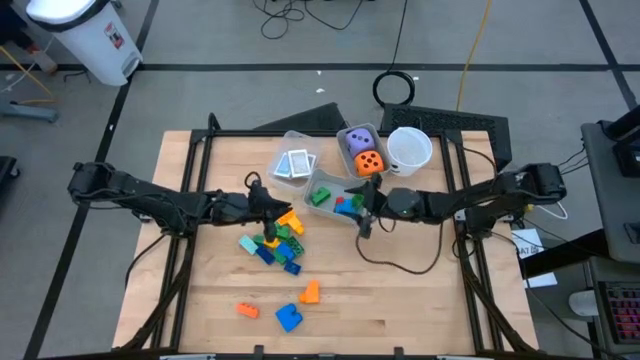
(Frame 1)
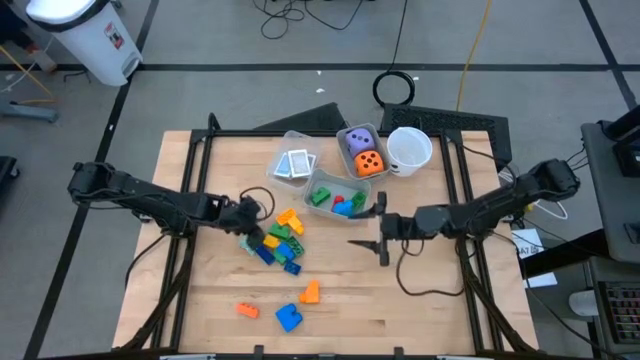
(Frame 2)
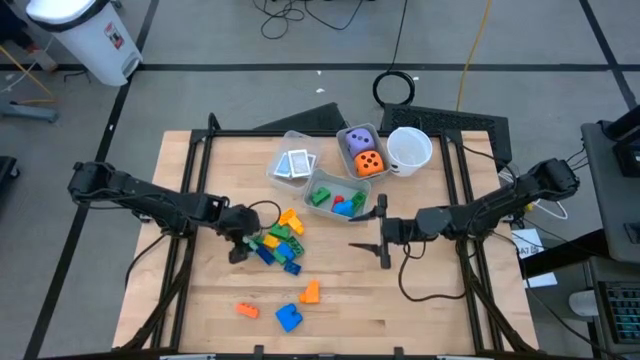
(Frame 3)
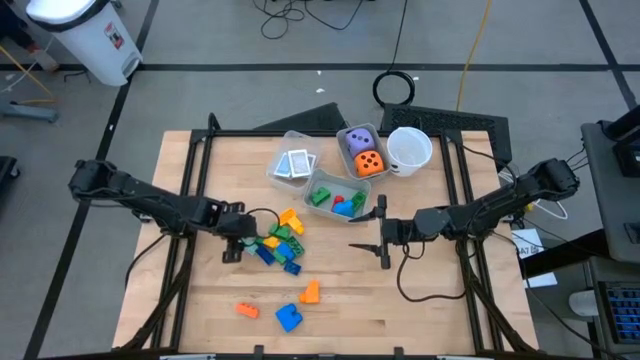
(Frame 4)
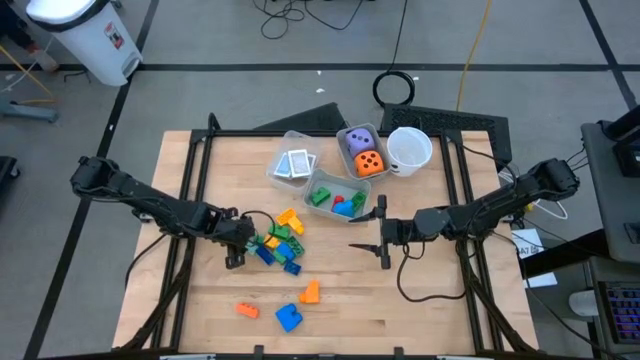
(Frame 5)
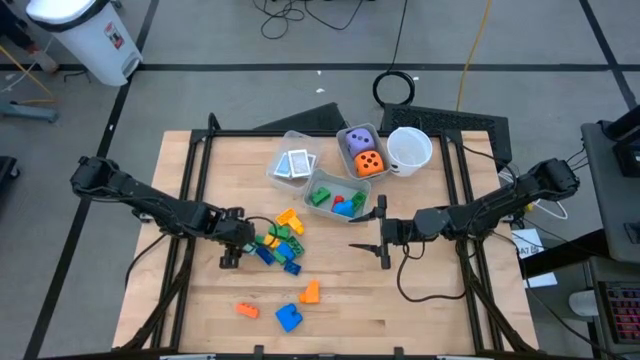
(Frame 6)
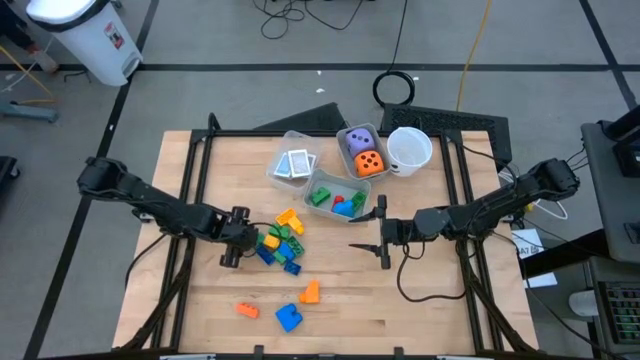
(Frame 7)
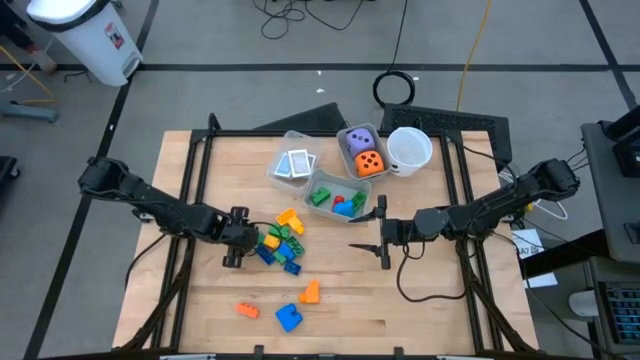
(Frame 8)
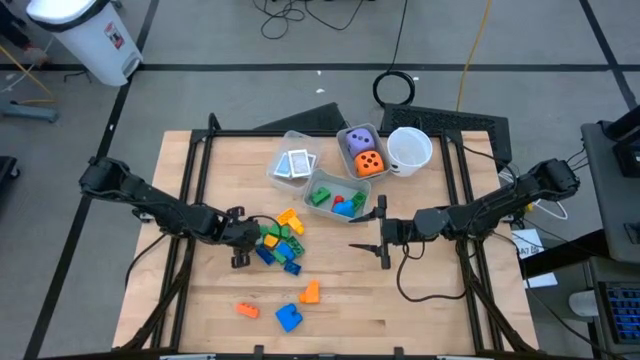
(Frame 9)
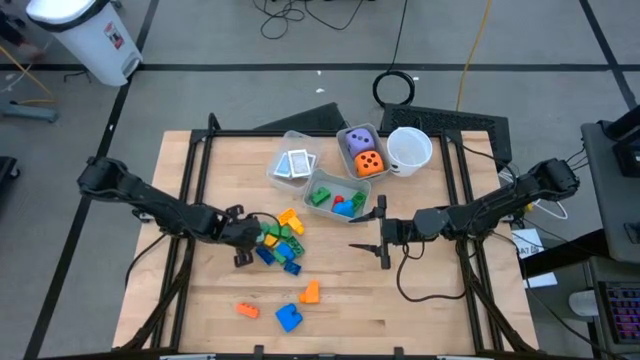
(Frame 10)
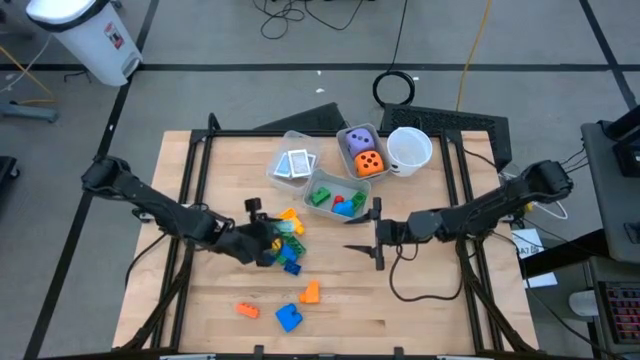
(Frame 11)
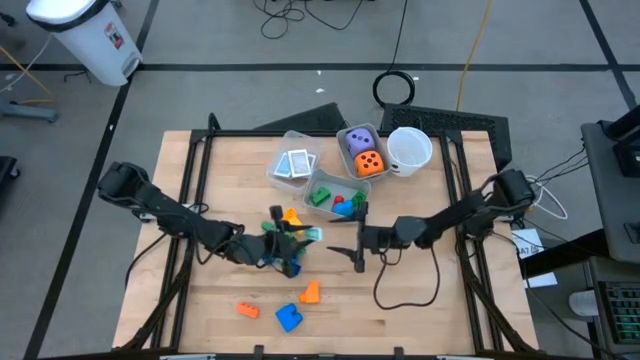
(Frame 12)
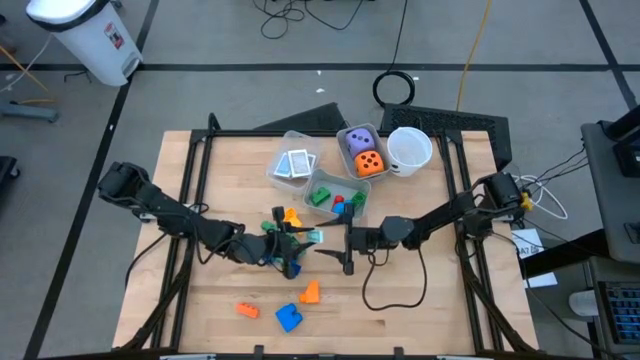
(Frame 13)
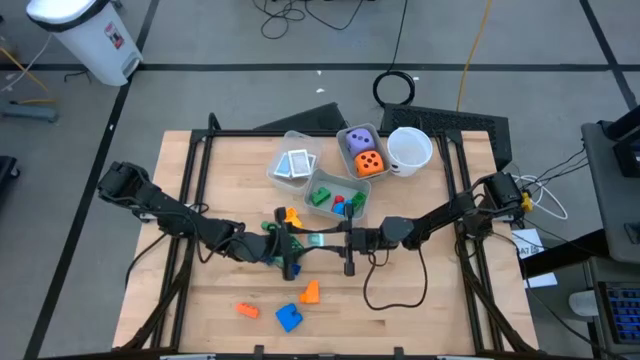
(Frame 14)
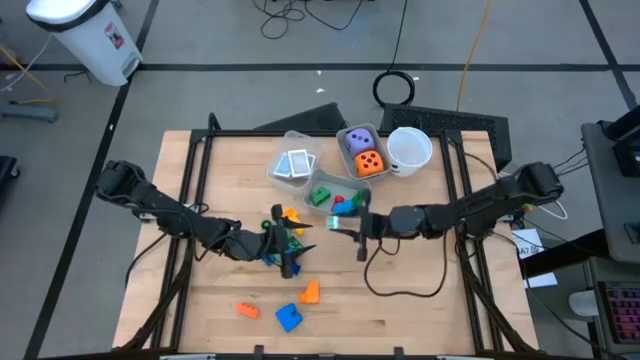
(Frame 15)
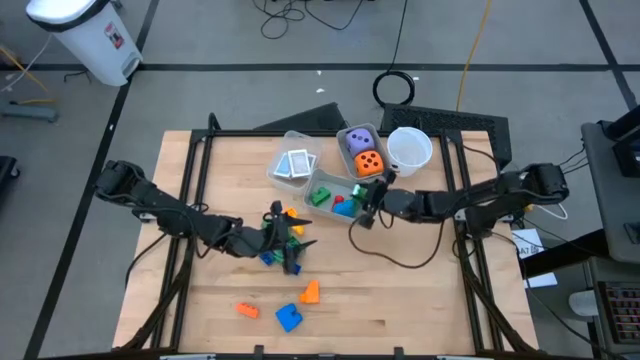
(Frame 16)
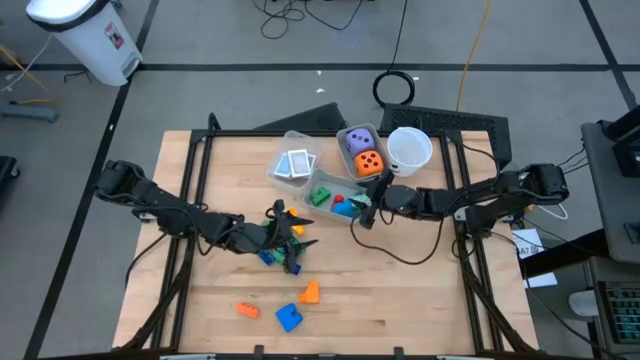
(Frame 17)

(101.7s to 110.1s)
Task: Pick & Place Toys
Put the light blue game piece into the bottom gray bin

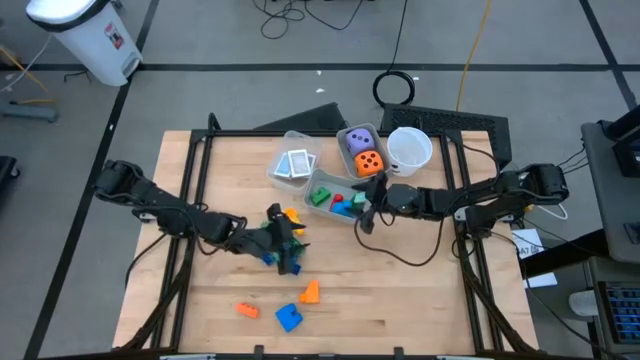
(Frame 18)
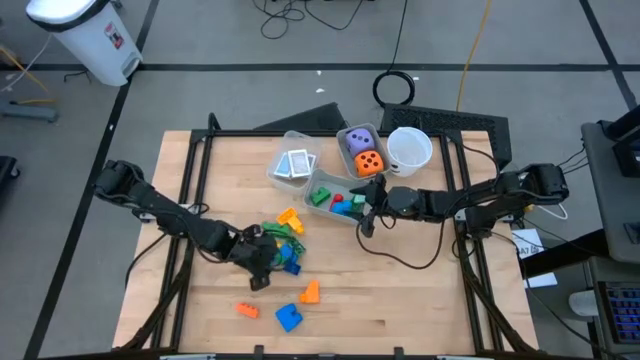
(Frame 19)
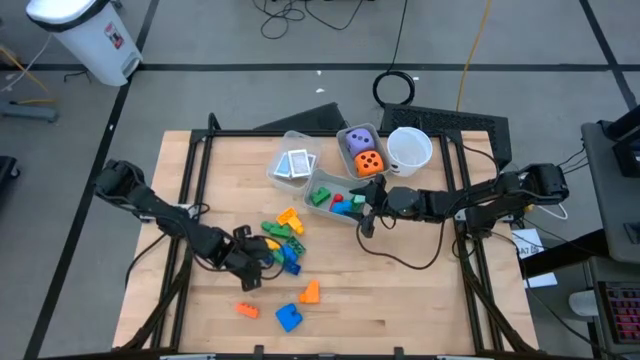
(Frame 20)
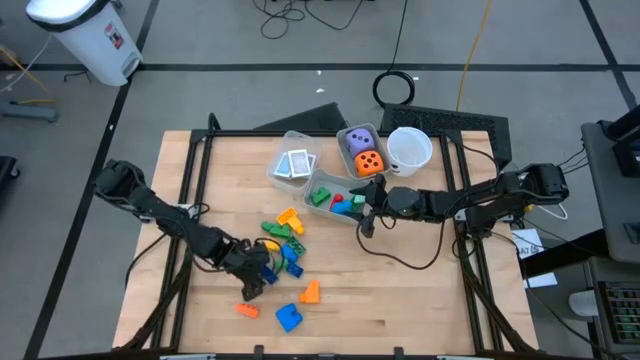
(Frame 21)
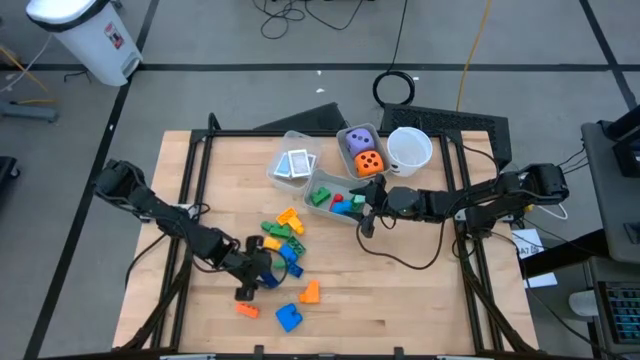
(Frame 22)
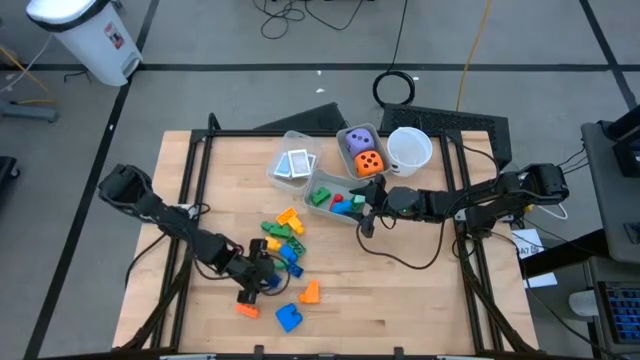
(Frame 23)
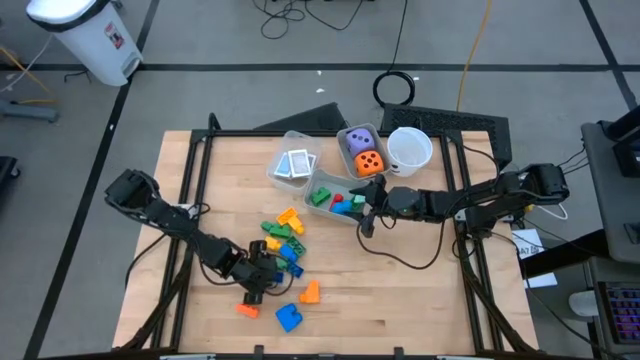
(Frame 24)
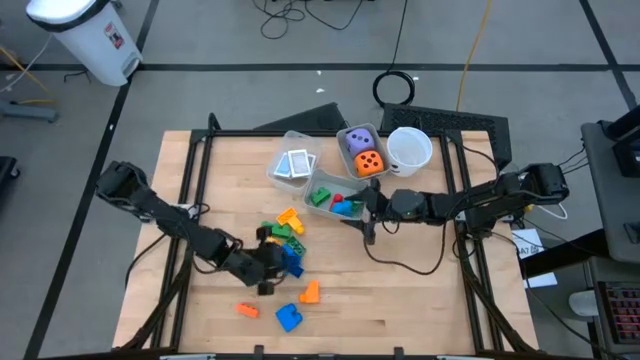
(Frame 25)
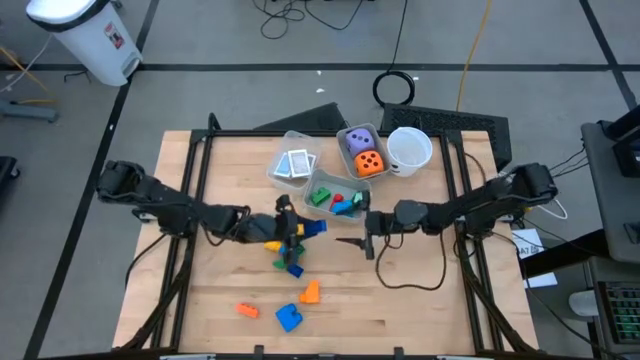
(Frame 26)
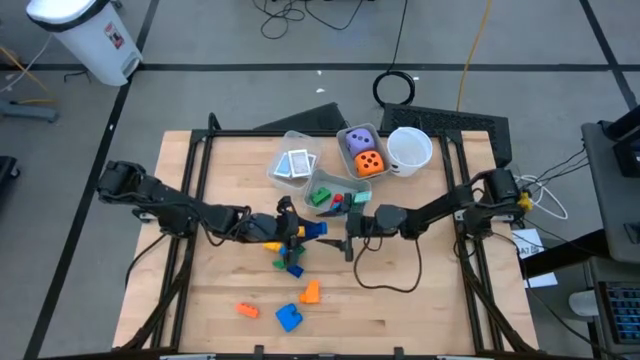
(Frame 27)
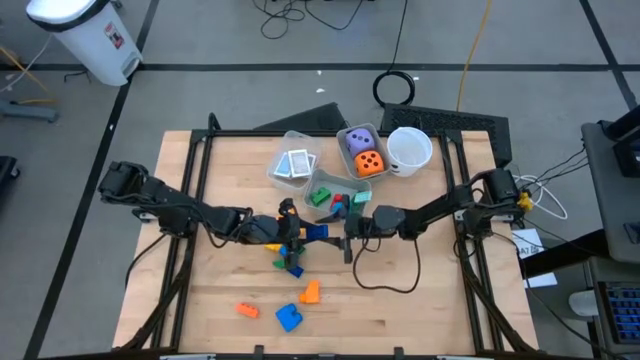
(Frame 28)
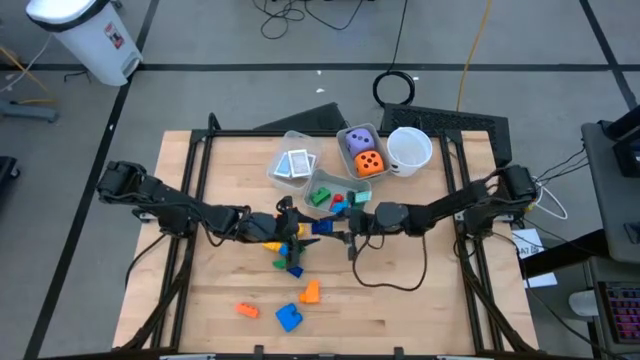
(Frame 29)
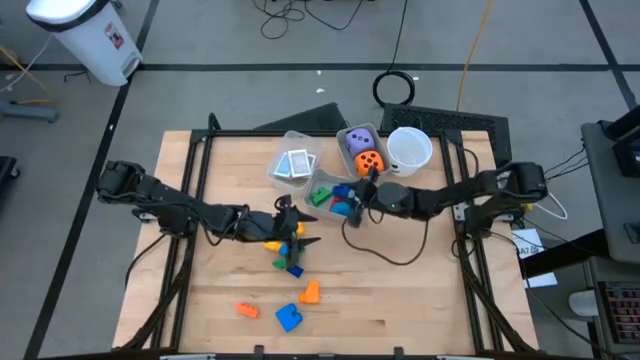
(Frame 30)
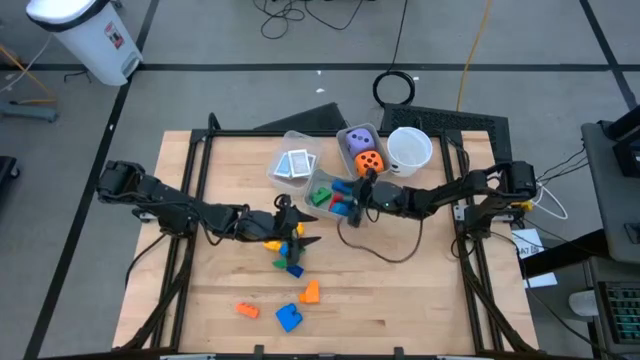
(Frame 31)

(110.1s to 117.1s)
Put the dark blue game piece into the bottom gray bin

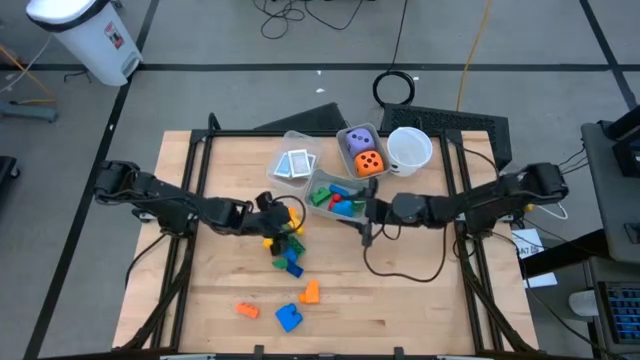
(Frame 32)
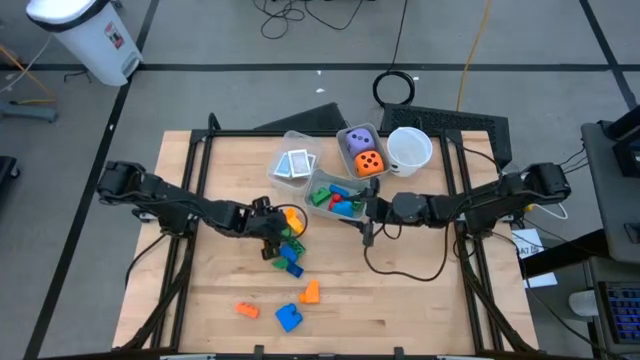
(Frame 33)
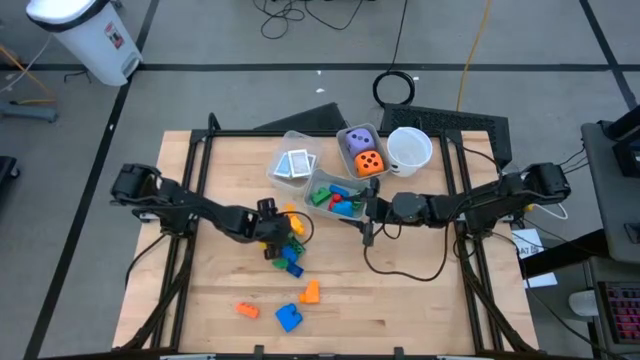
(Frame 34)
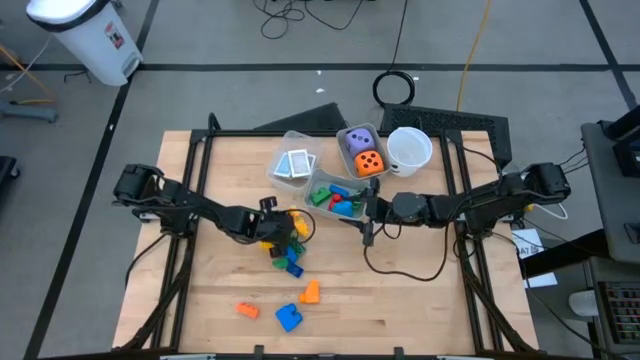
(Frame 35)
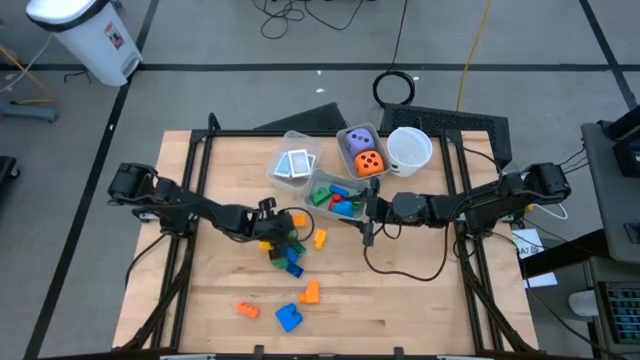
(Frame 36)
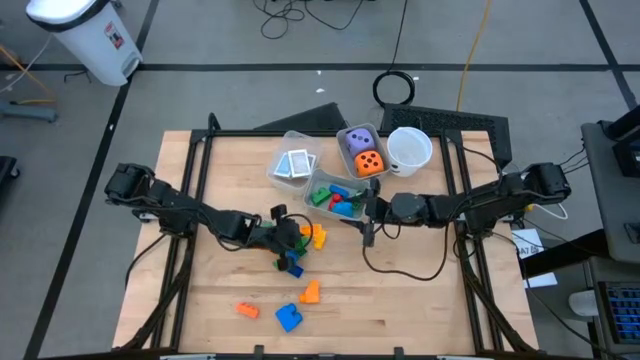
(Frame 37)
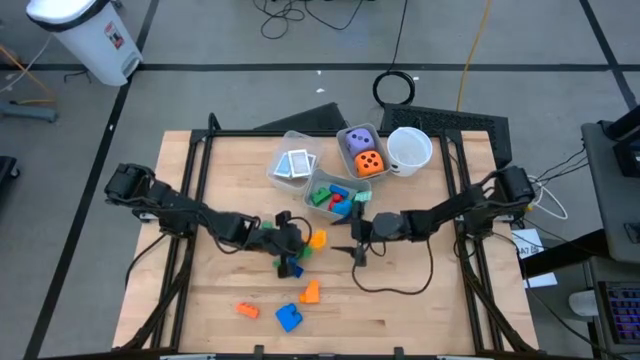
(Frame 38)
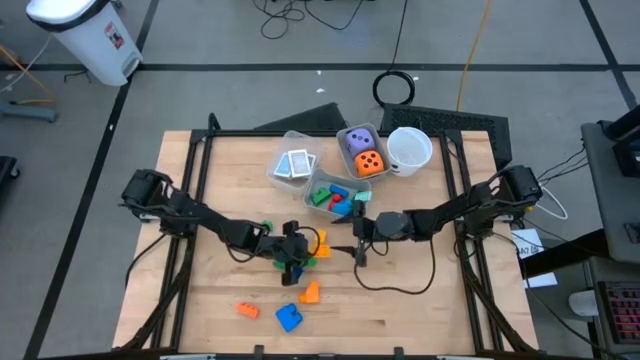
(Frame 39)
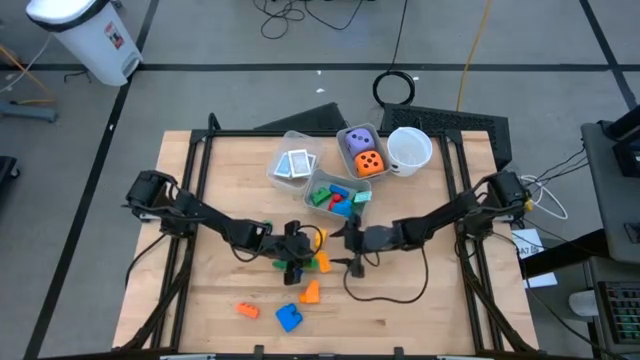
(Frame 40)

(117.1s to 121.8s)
Put the green game piece into the bottom gray bin

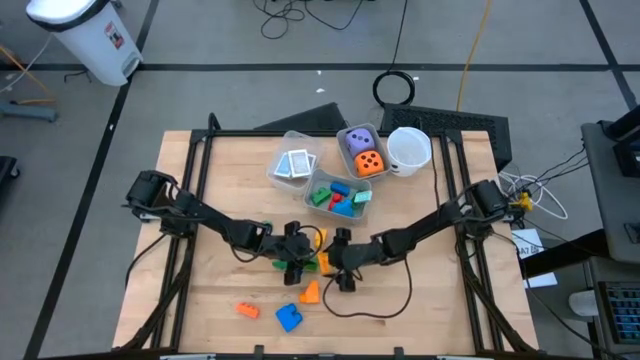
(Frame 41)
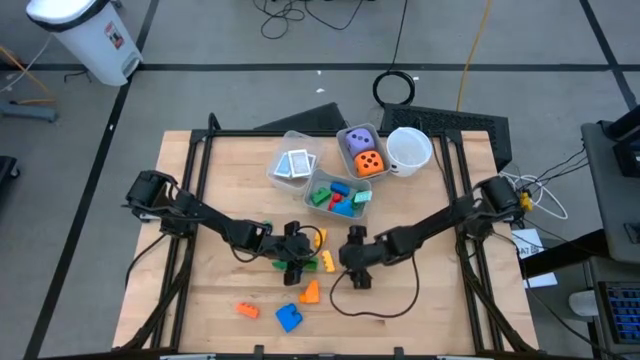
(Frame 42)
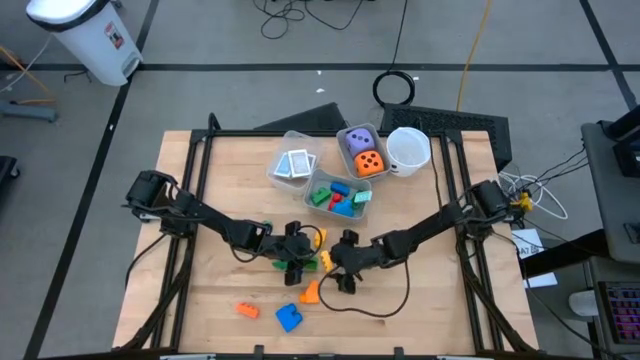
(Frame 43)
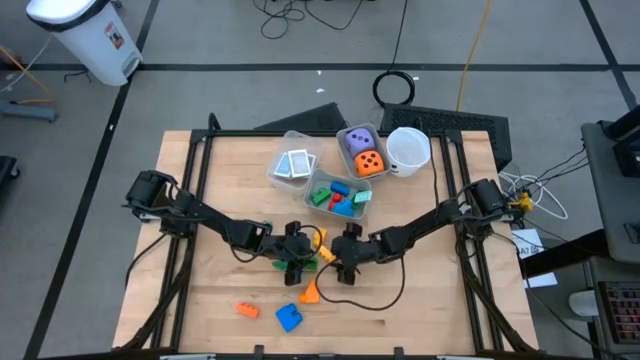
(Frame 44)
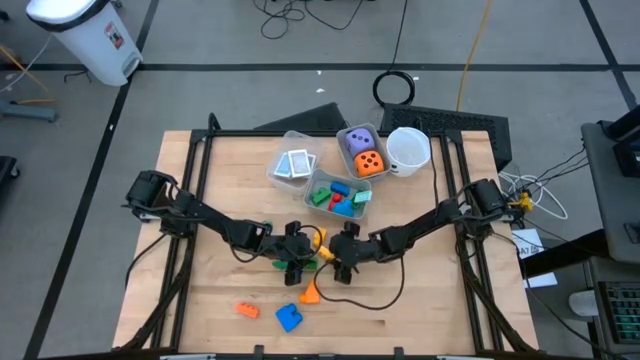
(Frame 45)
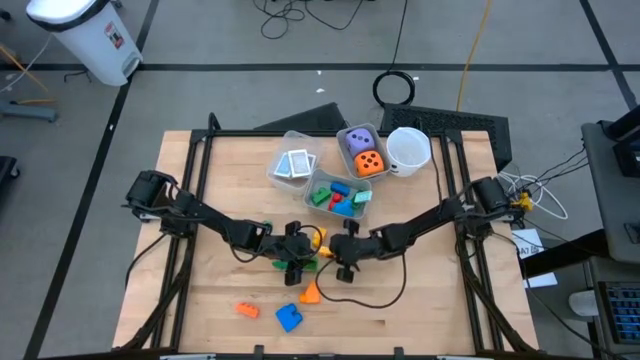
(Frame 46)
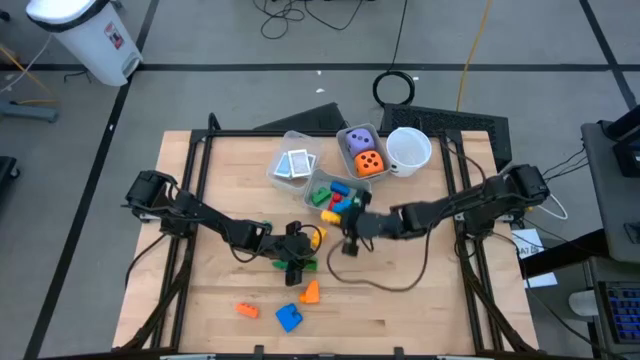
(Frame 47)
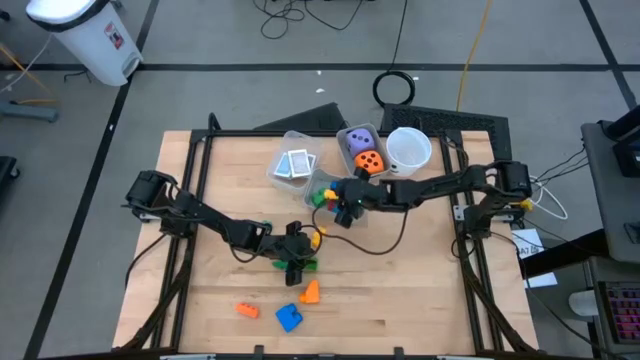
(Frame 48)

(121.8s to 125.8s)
Put the yellow game piece into the bottom gray bin
